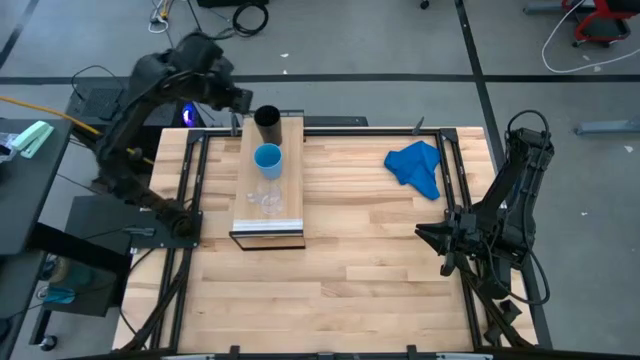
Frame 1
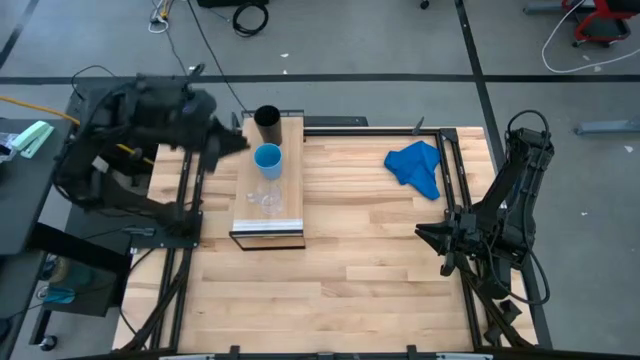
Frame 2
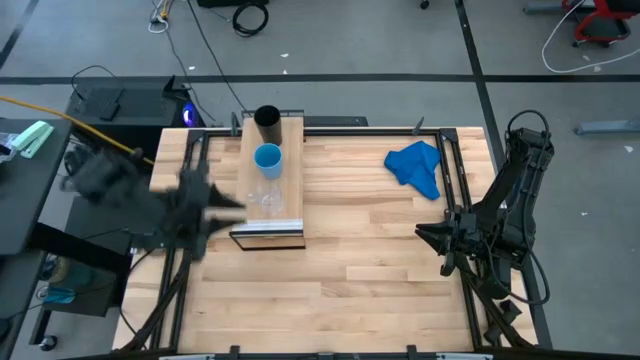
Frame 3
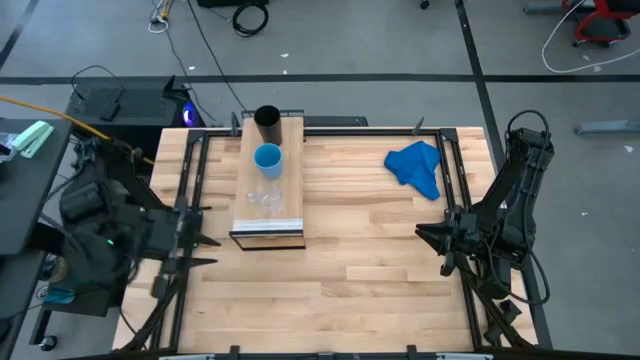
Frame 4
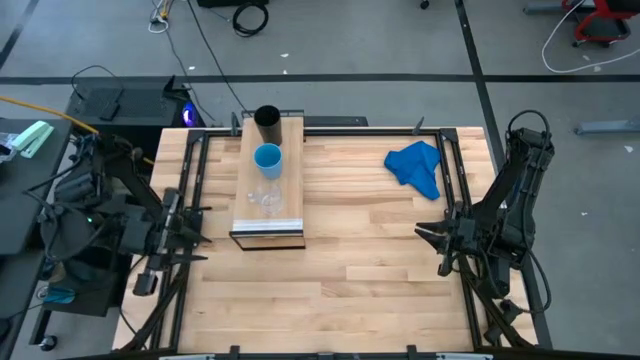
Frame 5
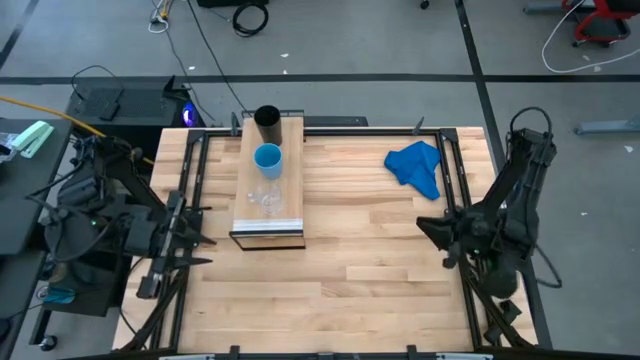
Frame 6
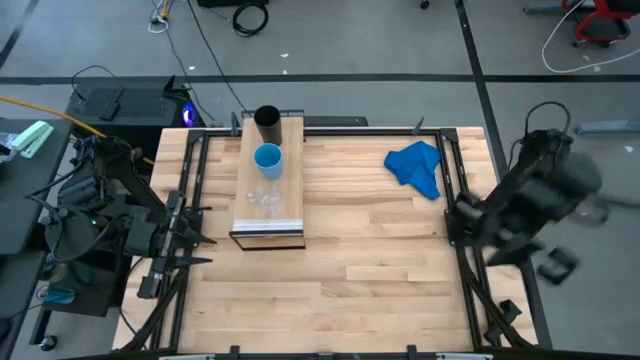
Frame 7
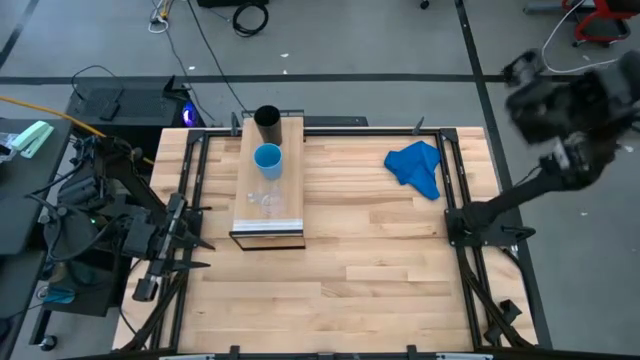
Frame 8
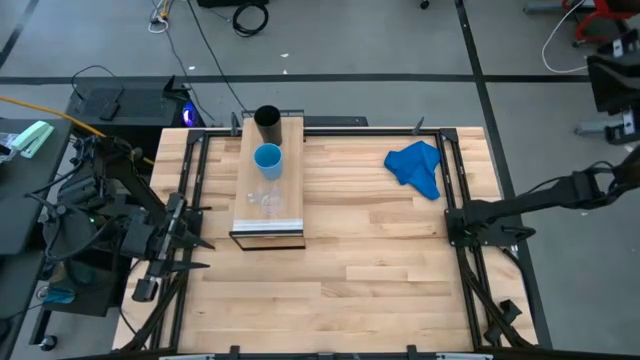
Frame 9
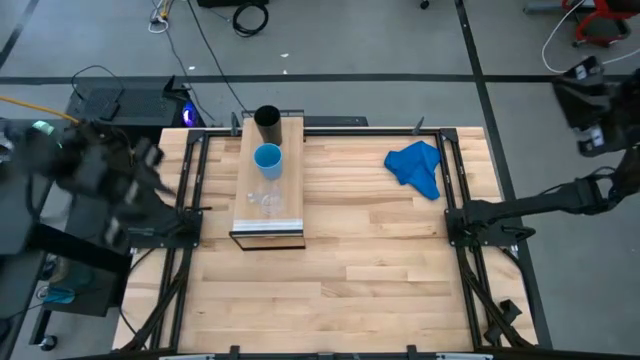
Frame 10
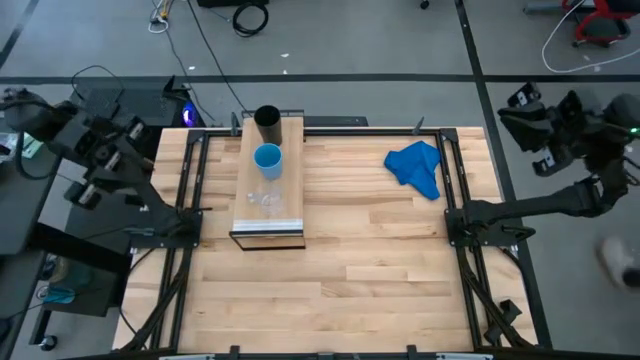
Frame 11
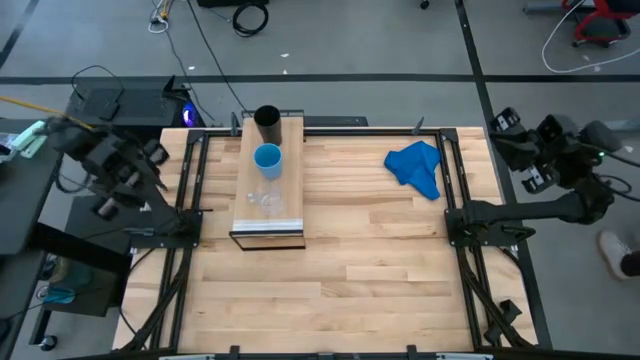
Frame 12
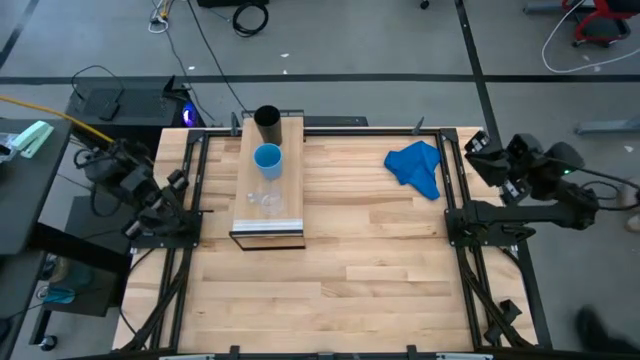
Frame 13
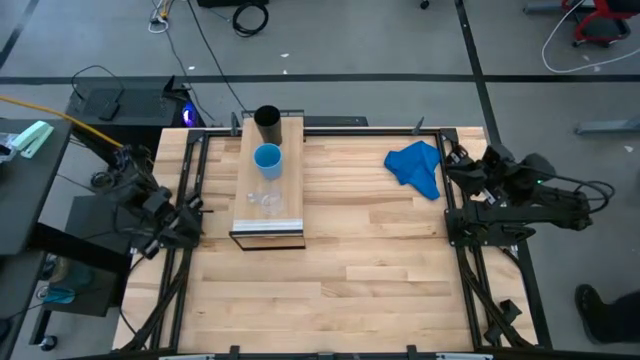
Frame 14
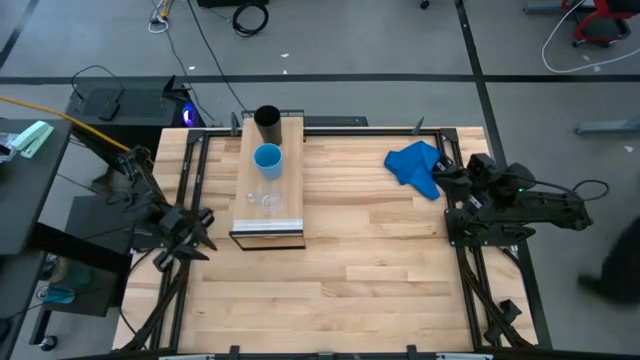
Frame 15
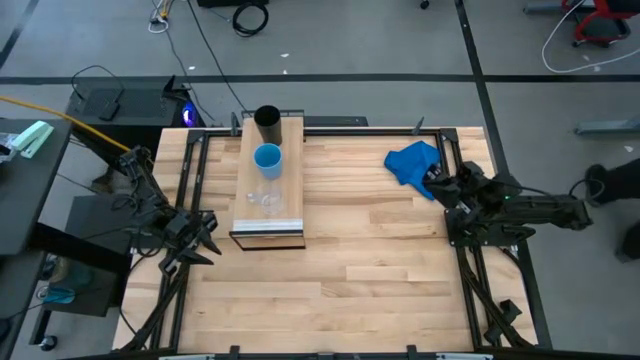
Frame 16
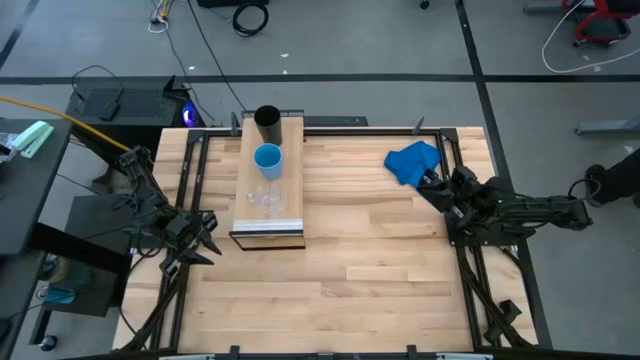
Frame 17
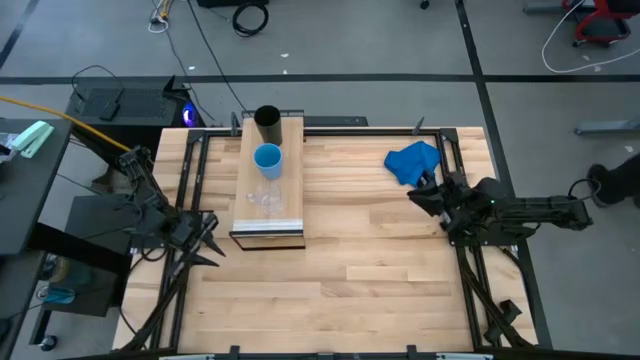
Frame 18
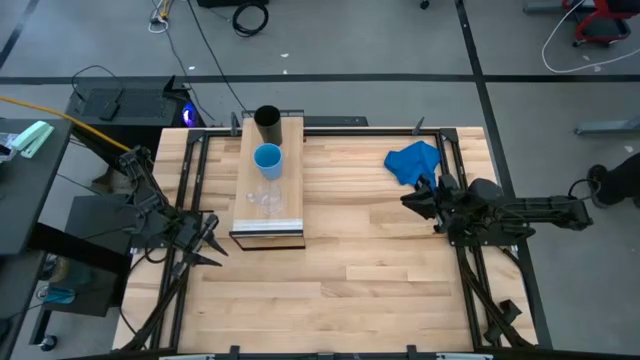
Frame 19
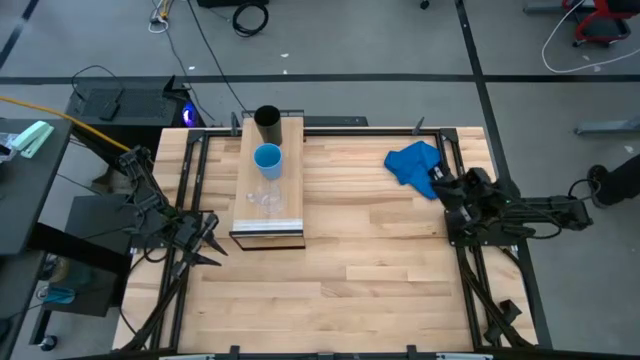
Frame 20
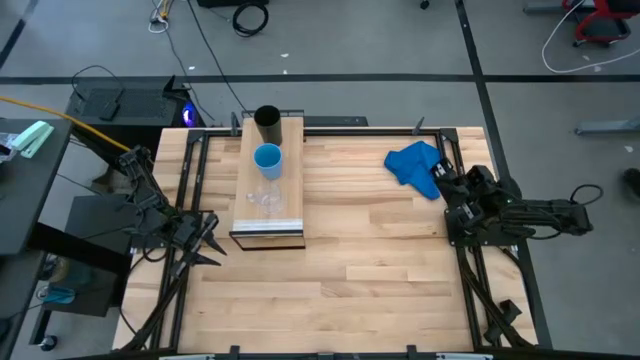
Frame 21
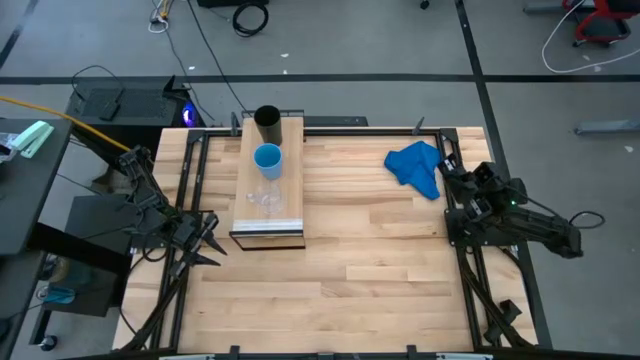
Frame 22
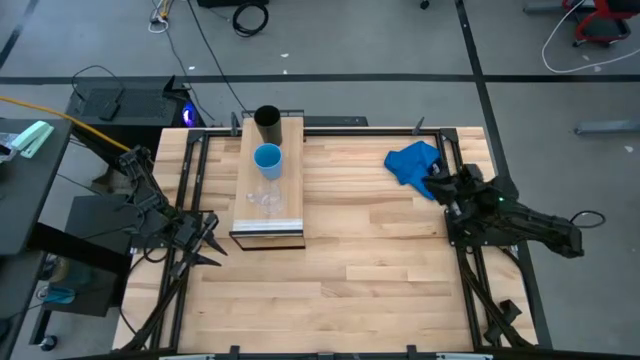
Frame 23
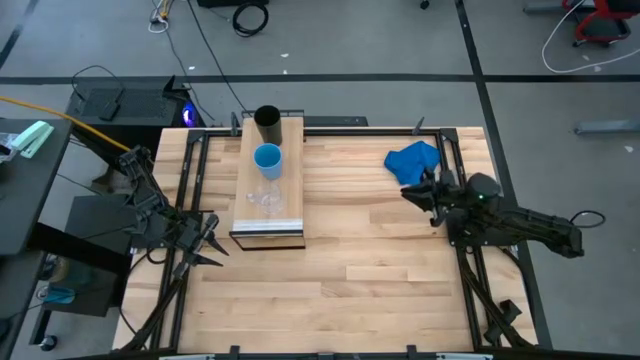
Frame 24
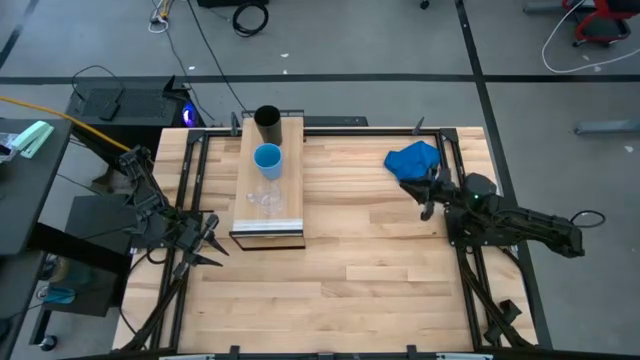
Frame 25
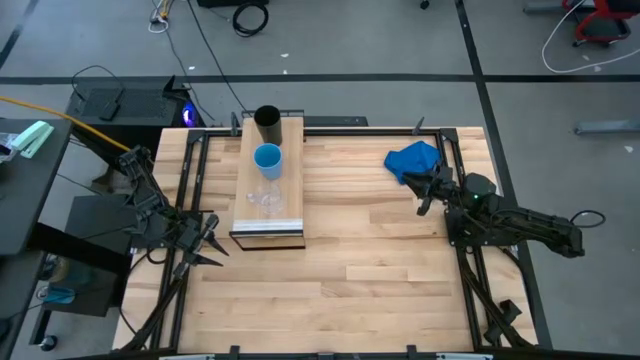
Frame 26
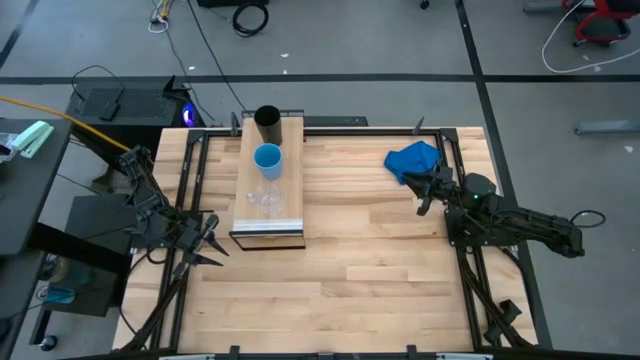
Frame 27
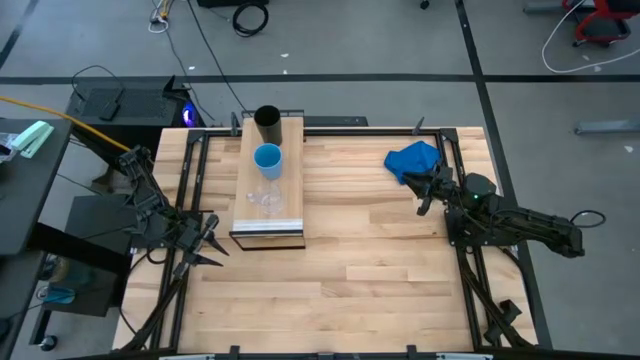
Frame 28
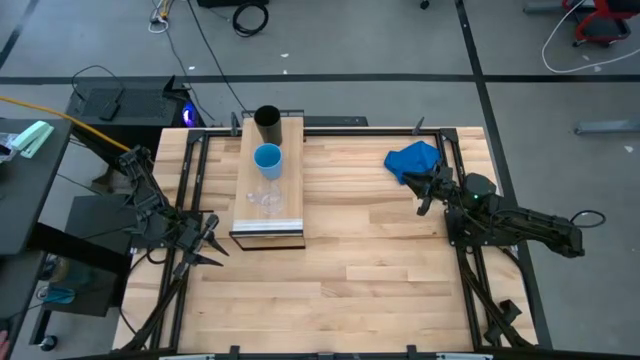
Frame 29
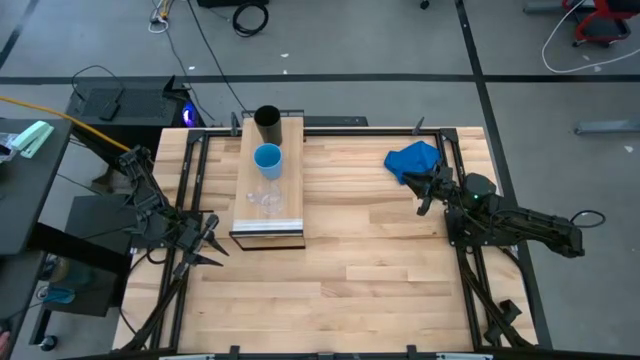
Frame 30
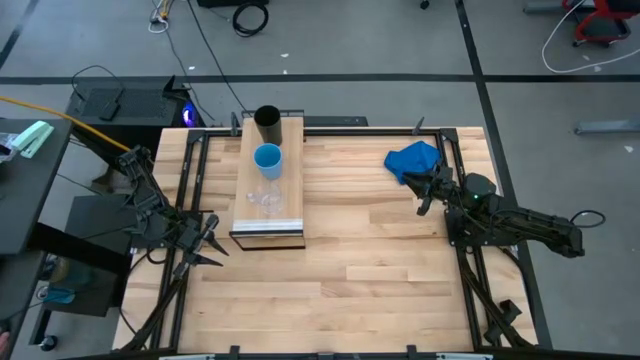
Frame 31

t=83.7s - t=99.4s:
Task: Stack small to large cups/mugs on shelf
Return to Home Position

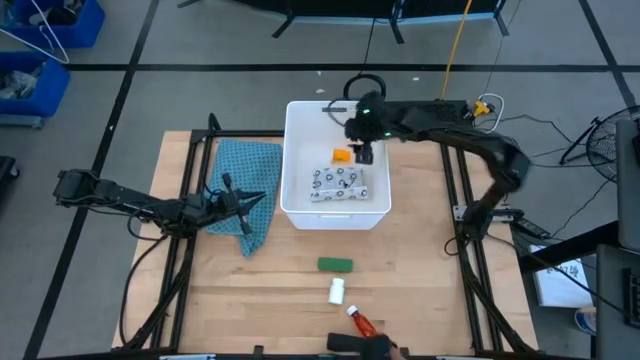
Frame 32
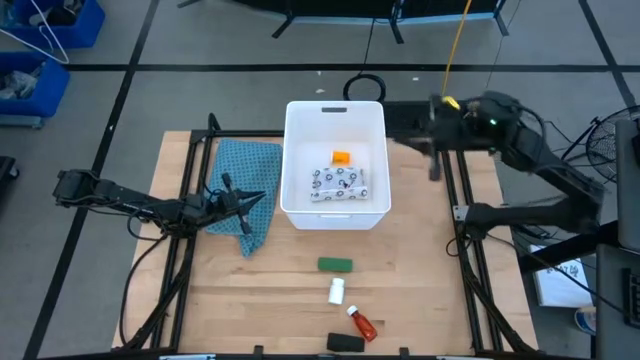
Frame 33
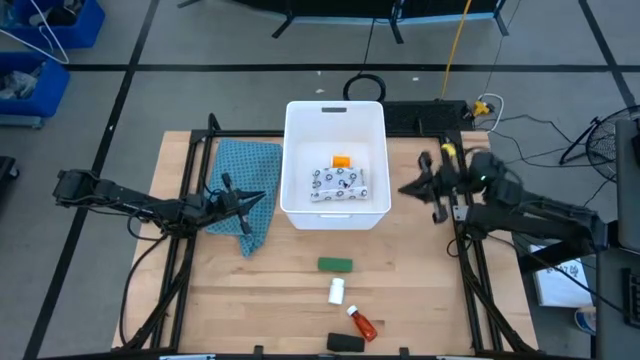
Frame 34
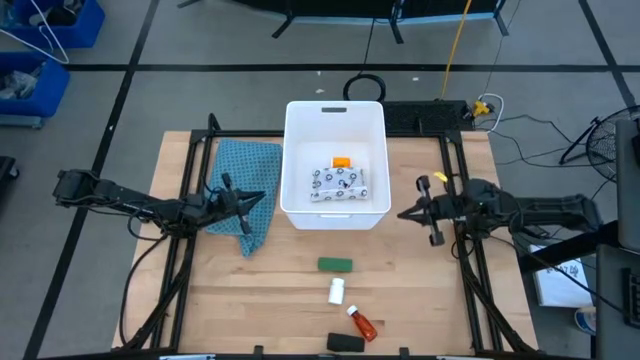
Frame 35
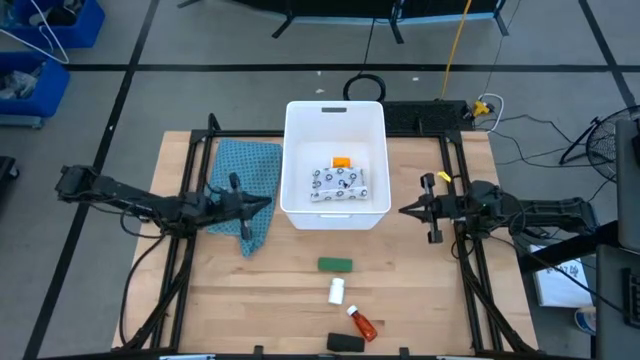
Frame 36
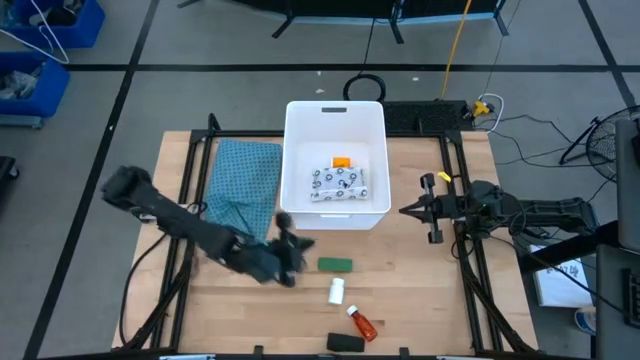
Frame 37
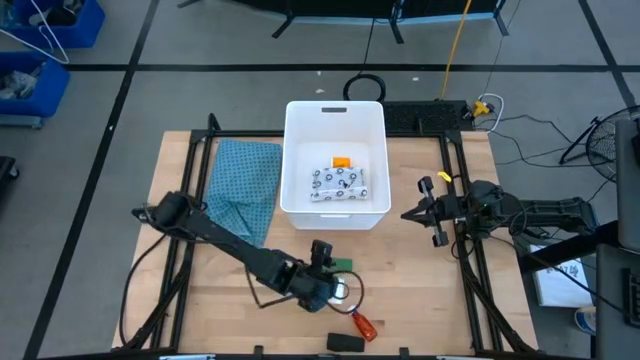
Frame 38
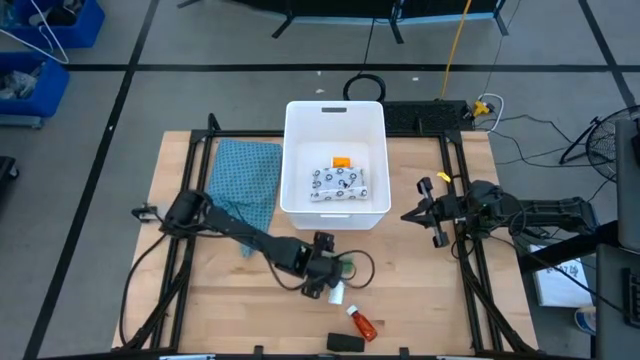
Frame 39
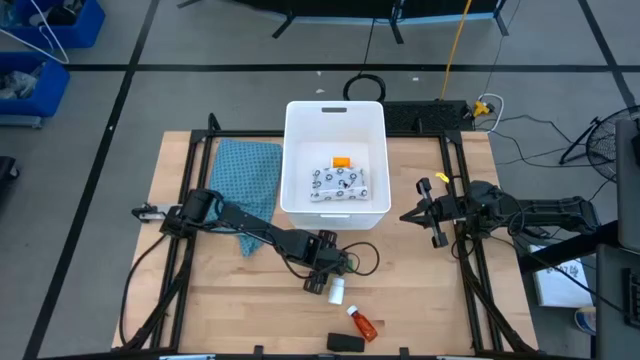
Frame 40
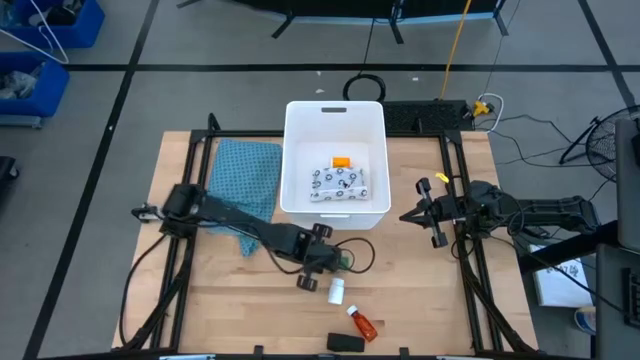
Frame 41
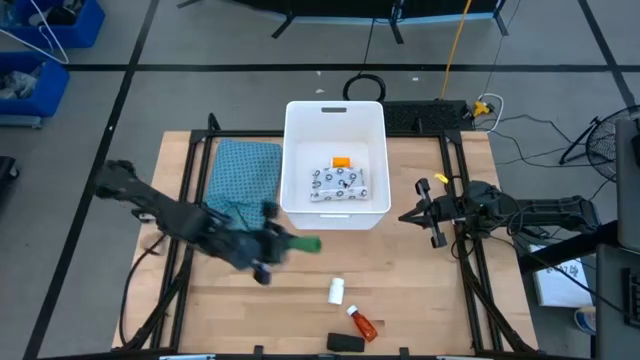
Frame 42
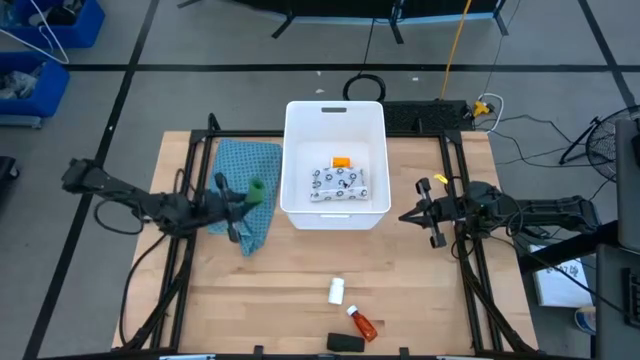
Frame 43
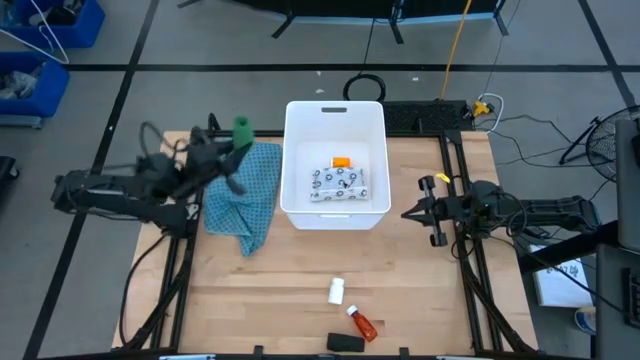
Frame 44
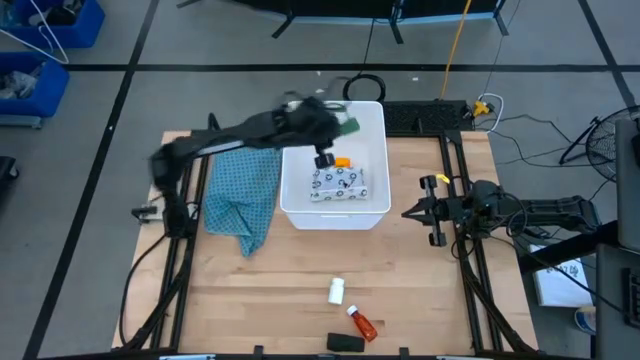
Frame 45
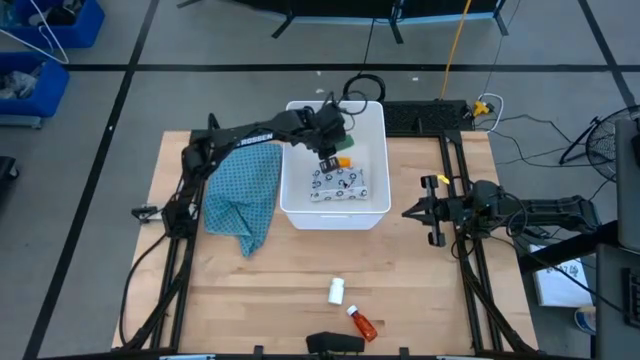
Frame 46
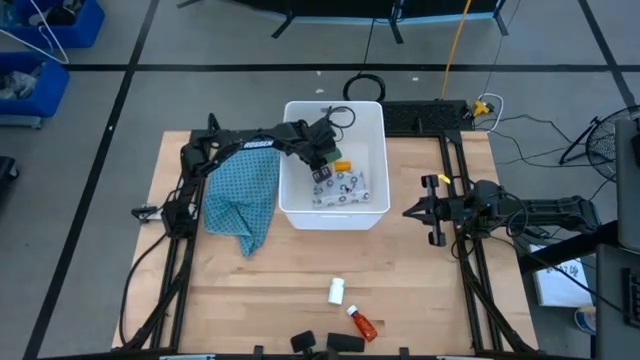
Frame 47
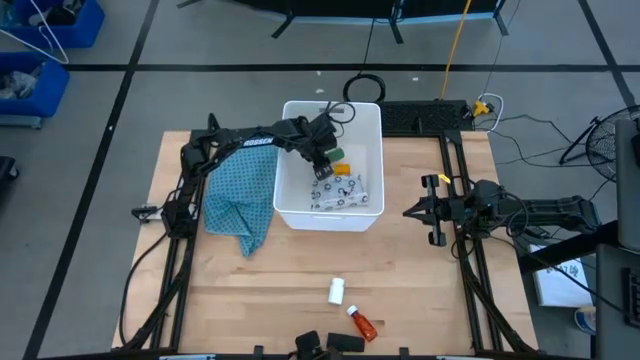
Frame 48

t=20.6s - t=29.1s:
Task: Pick & place medical supplies in basket/bin
Put the green bandage into the white bin
